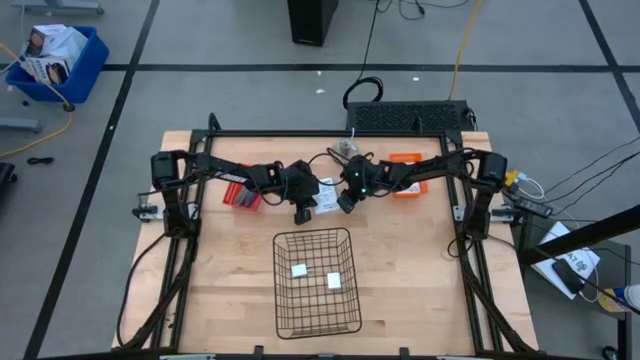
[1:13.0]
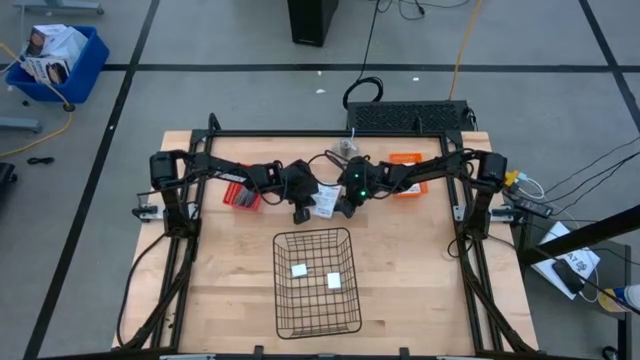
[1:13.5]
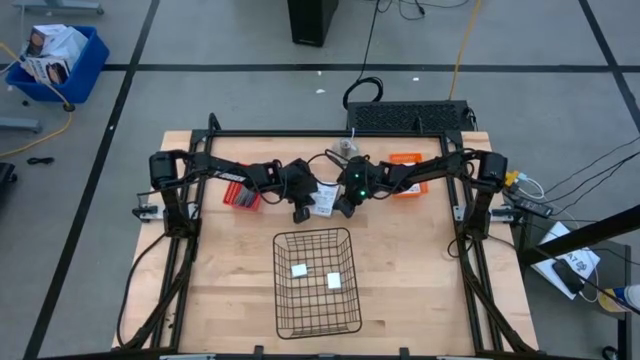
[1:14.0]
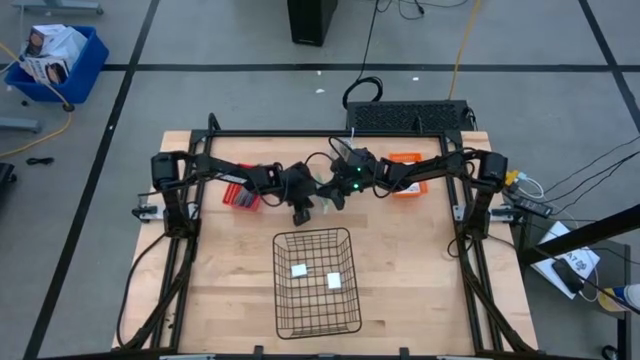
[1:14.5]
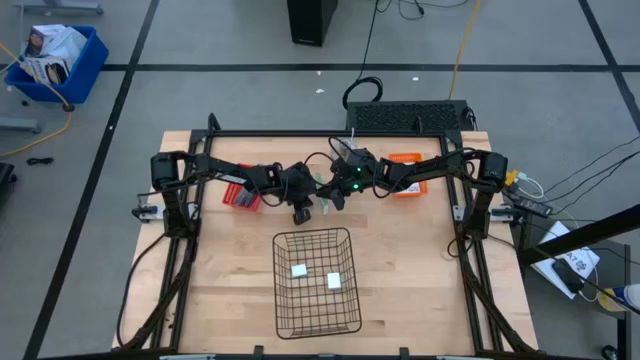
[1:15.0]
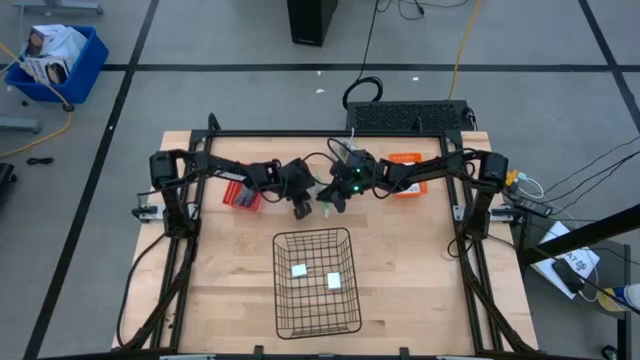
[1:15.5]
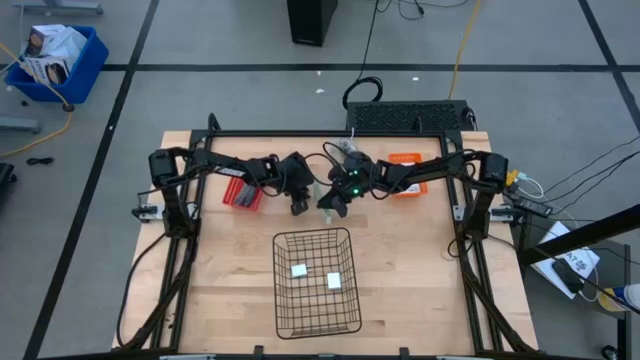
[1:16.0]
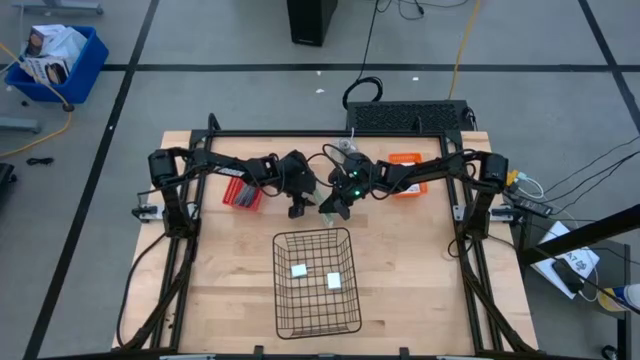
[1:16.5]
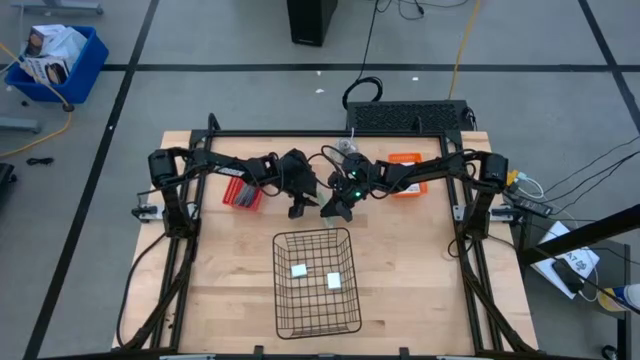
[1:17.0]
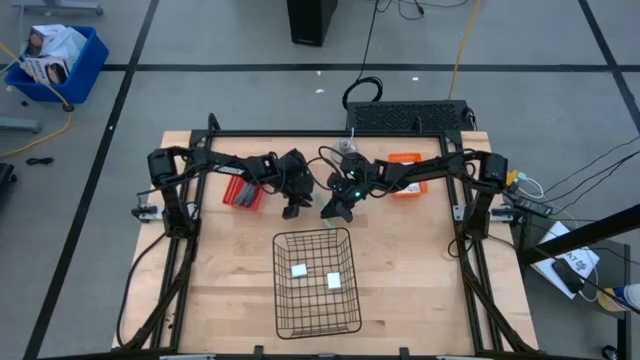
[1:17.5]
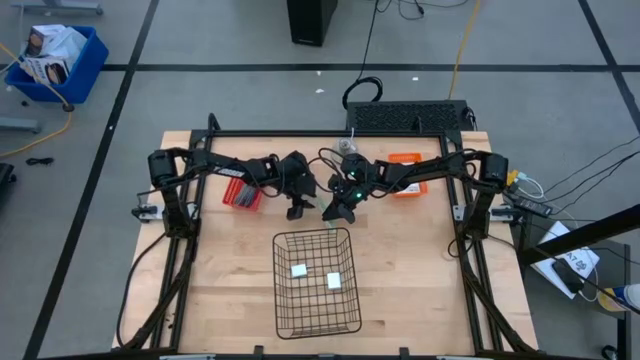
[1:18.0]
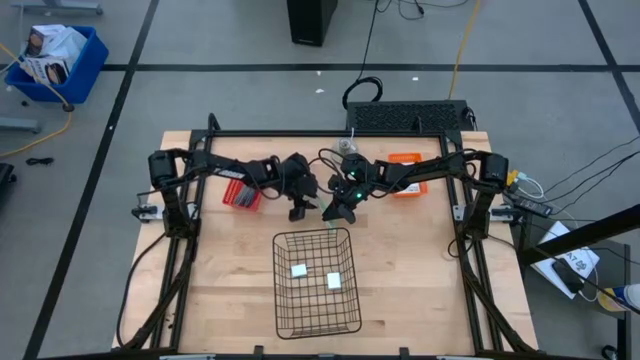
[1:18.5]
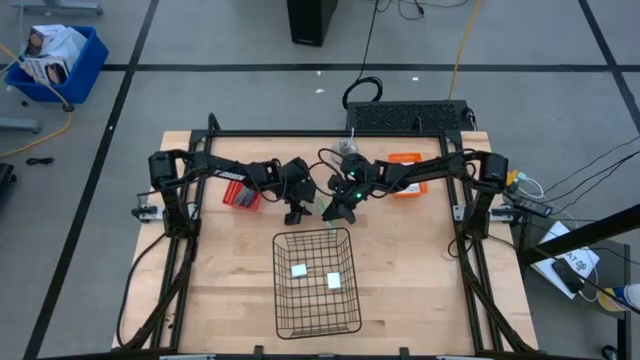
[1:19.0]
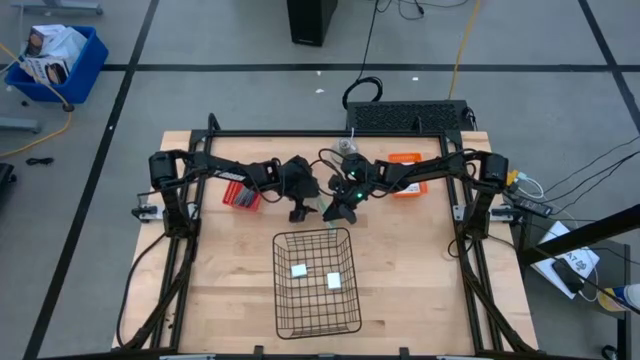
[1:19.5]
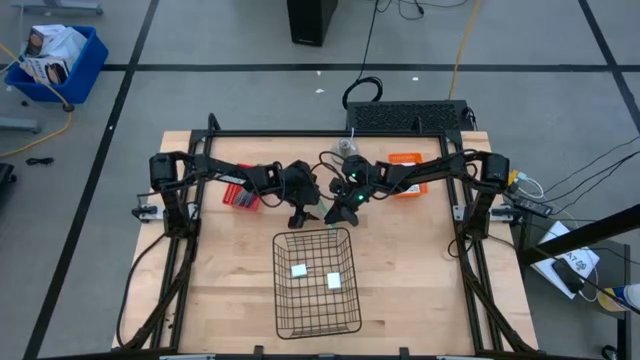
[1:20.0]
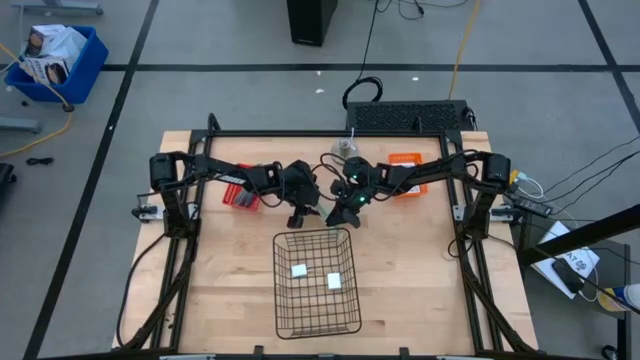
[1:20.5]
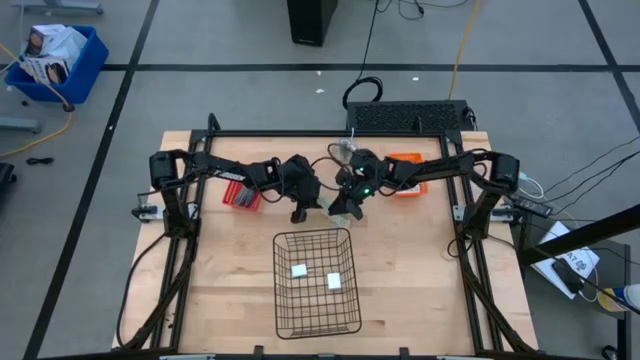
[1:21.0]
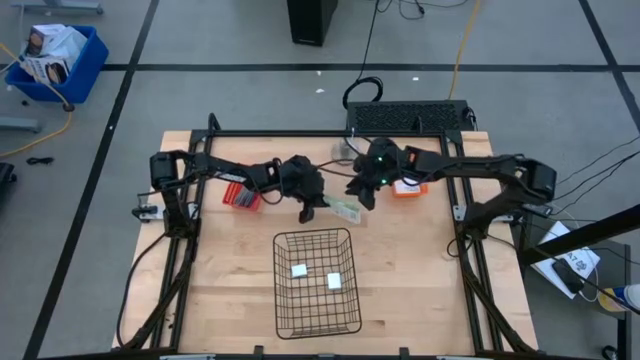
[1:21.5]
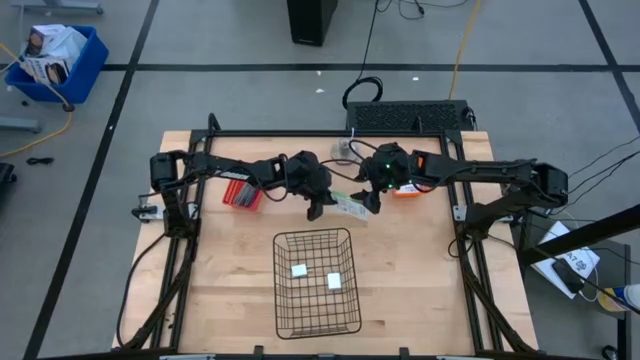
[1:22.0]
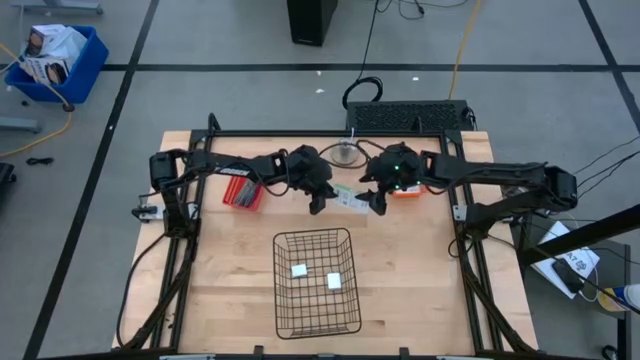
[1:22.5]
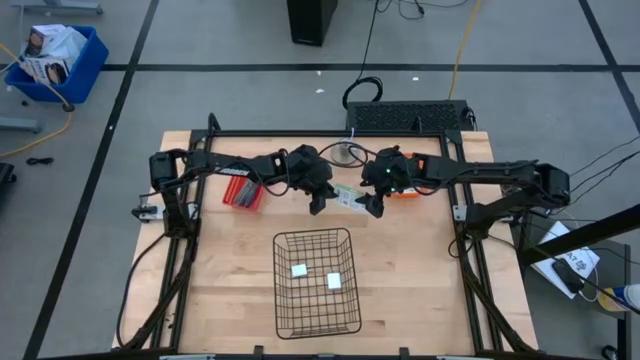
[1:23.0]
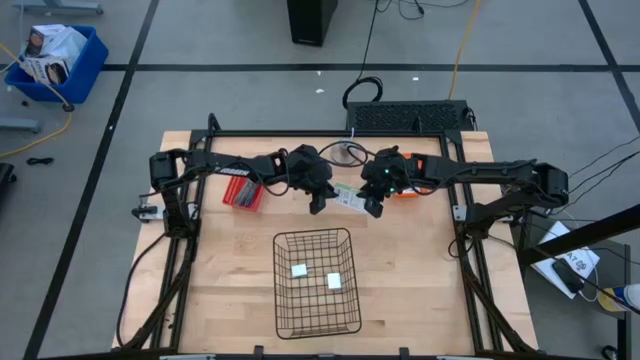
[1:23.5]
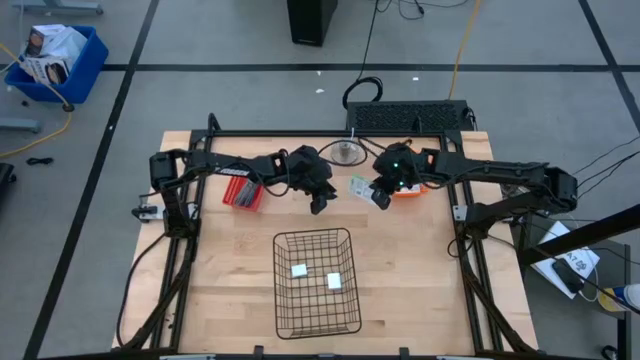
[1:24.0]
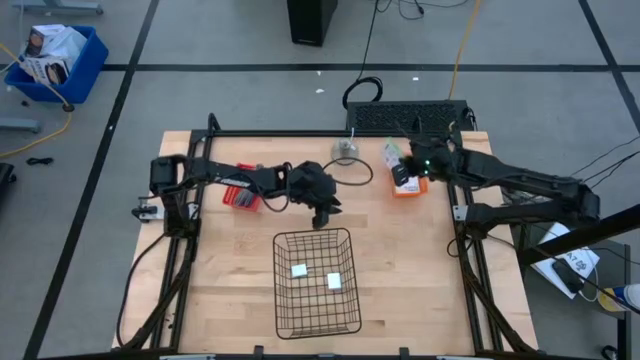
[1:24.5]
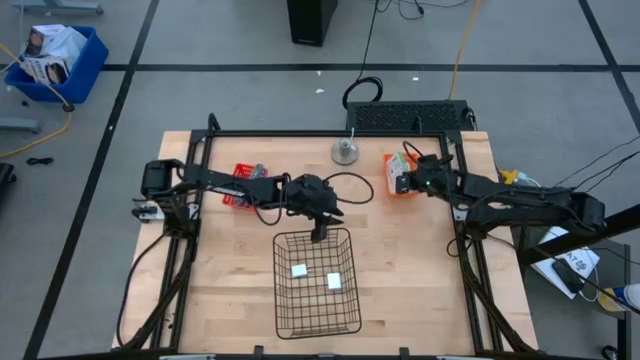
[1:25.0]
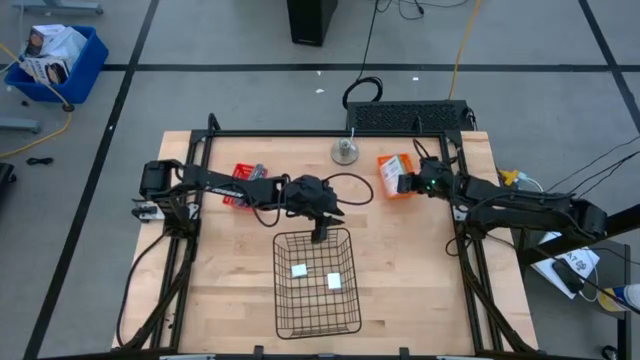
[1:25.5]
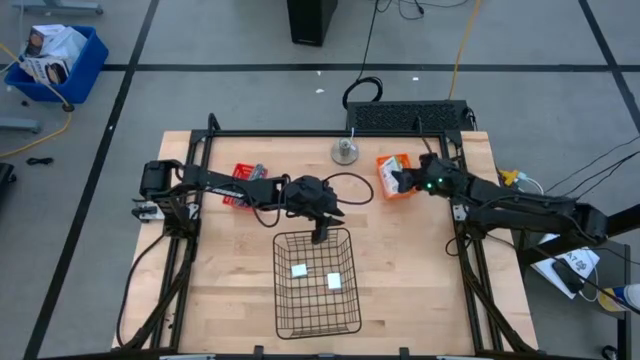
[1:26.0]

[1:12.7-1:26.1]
Task: Pick and place items into bin
Put the white card reader box into the orange basket

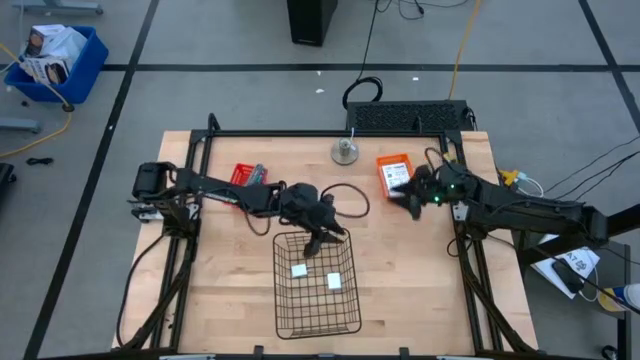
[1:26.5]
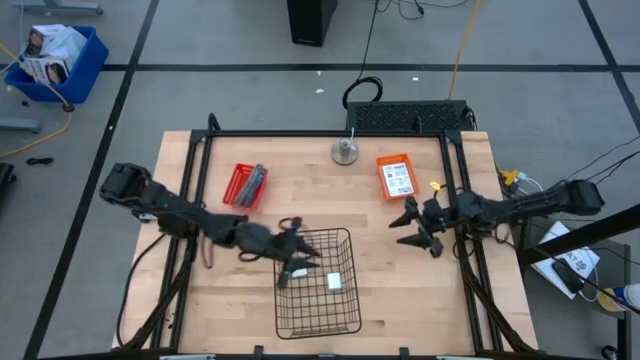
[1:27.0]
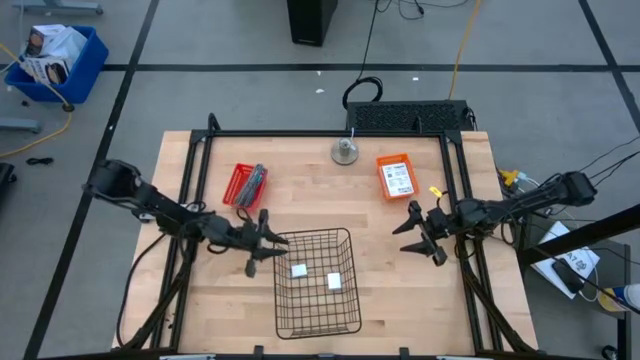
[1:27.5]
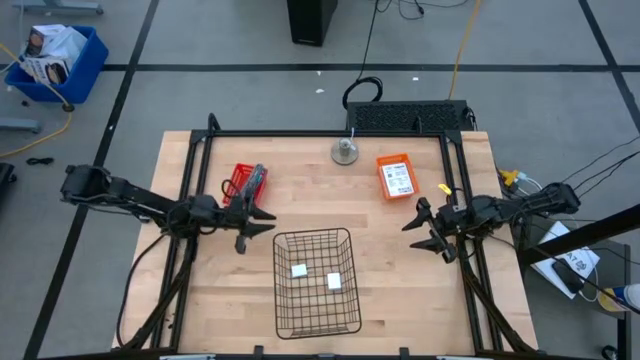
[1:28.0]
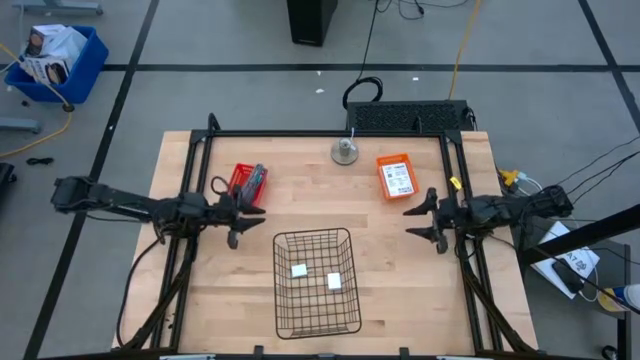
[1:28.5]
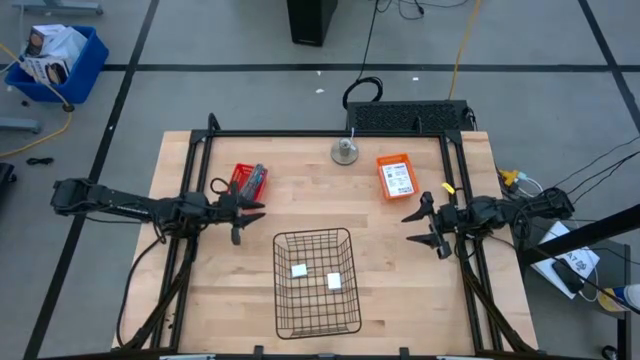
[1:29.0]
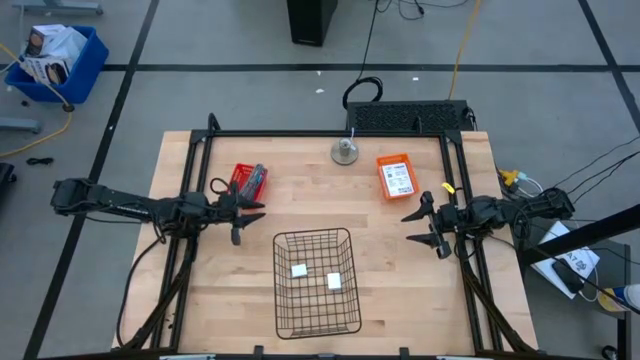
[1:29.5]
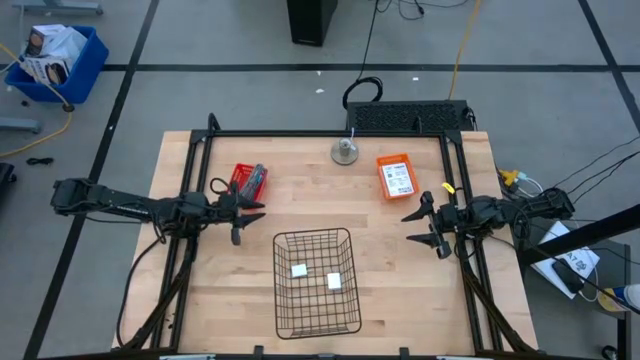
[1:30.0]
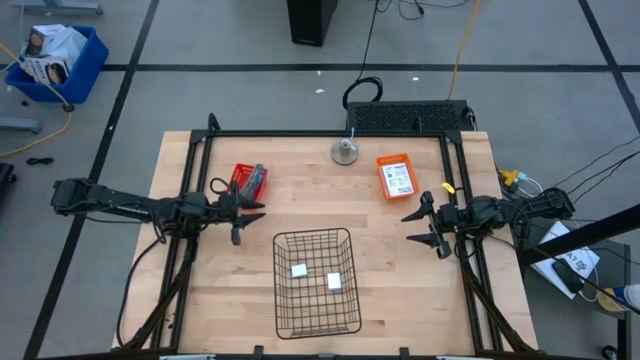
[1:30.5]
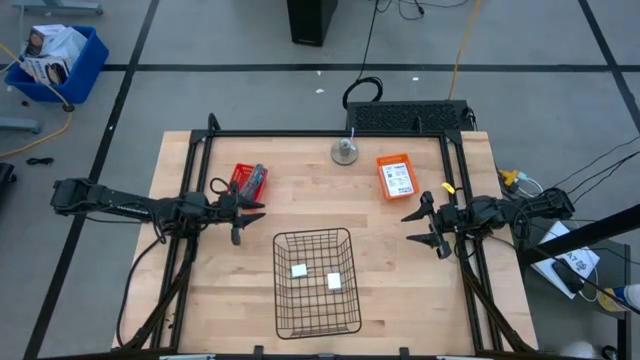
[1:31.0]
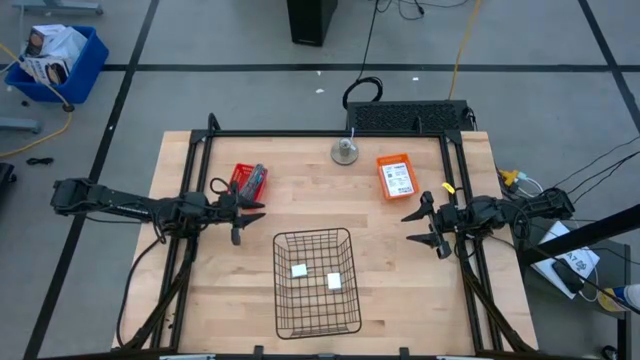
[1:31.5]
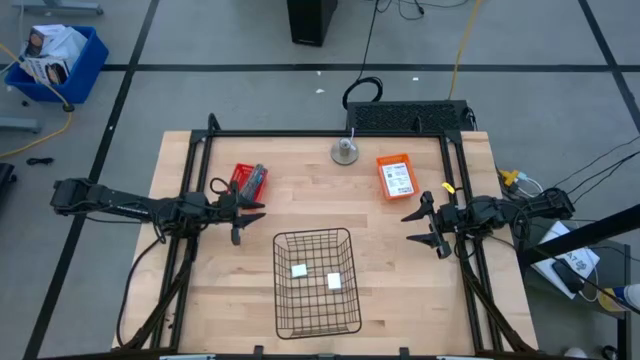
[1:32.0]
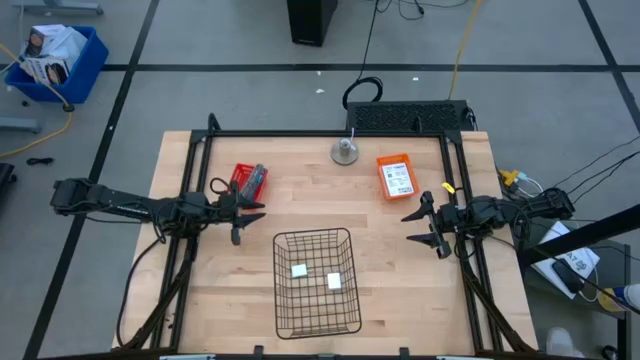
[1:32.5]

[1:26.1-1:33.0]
Return to Home Position

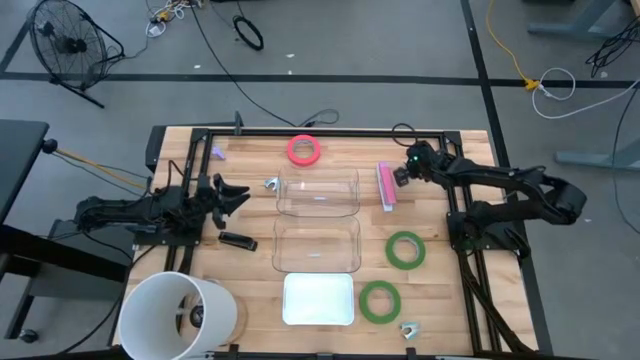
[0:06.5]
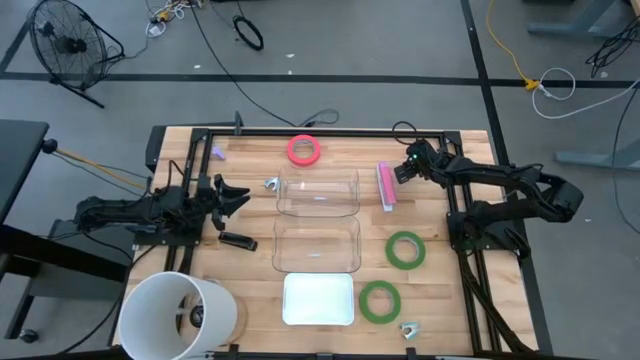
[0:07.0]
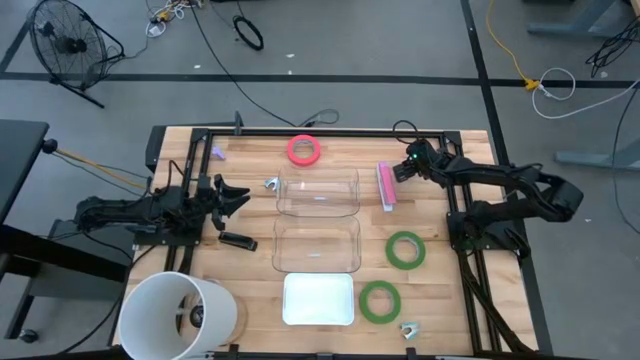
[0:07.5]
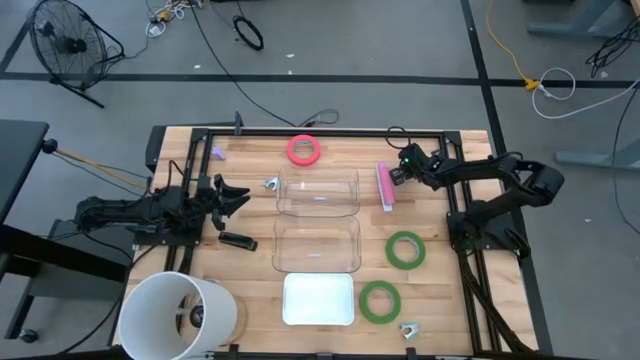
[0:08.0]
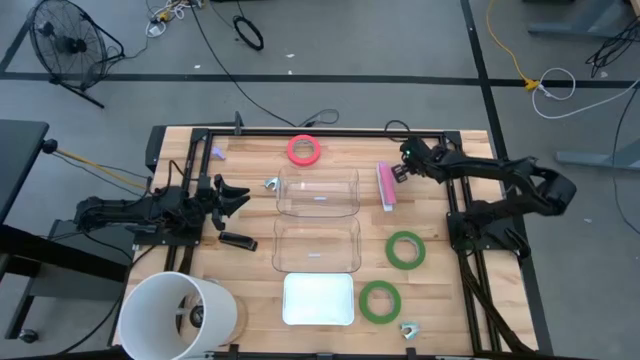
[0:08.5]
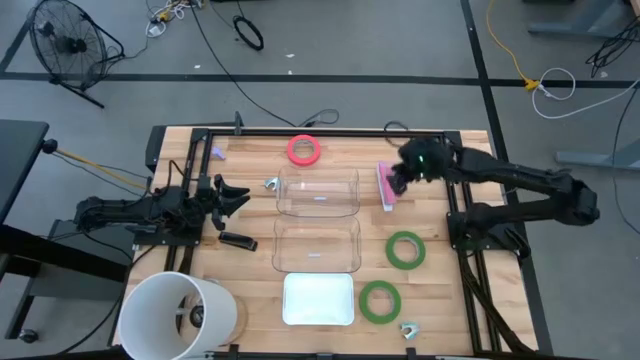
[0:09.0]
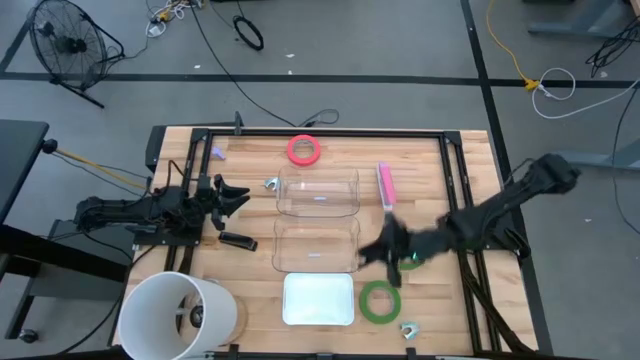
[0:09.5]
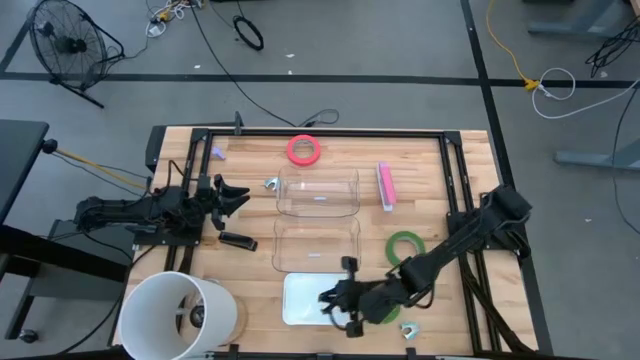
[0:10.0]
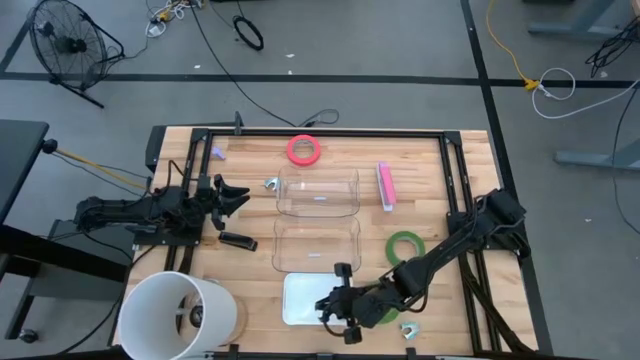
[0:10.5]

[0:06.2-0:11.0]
Task: Pick and place Stapler, Stapler remover, tape
Put the black staple remover into the white bin
